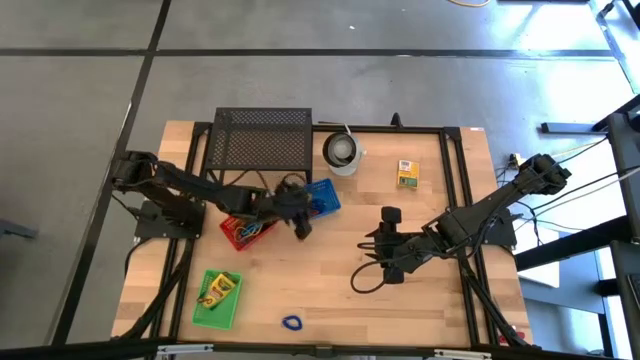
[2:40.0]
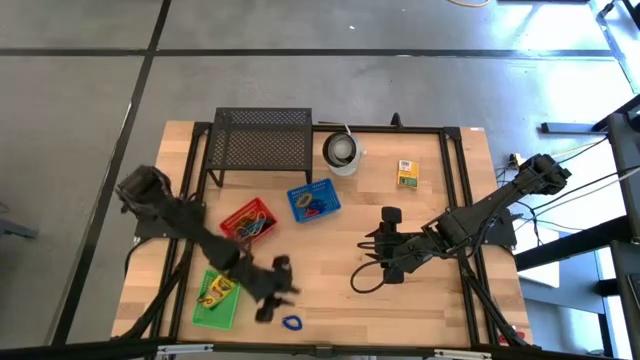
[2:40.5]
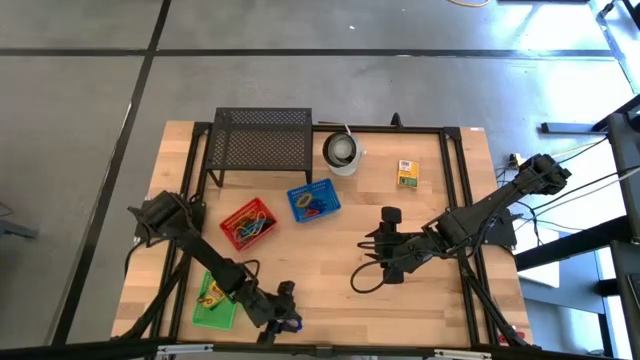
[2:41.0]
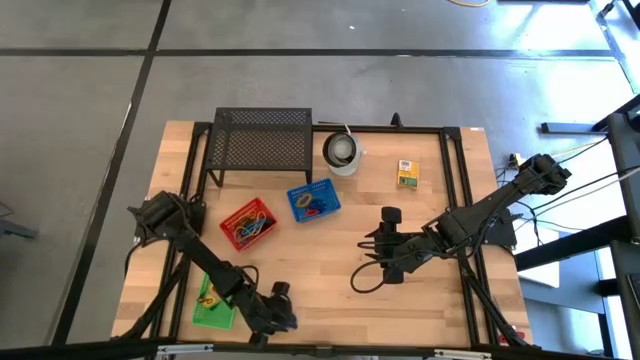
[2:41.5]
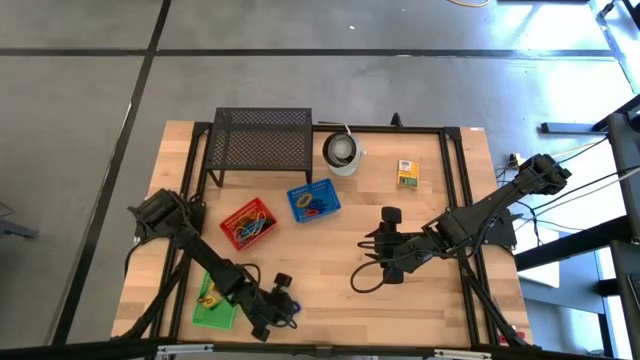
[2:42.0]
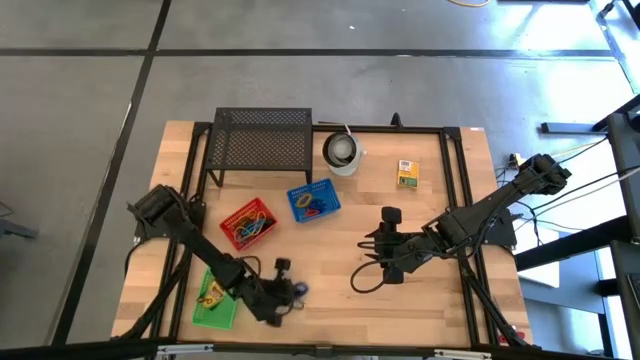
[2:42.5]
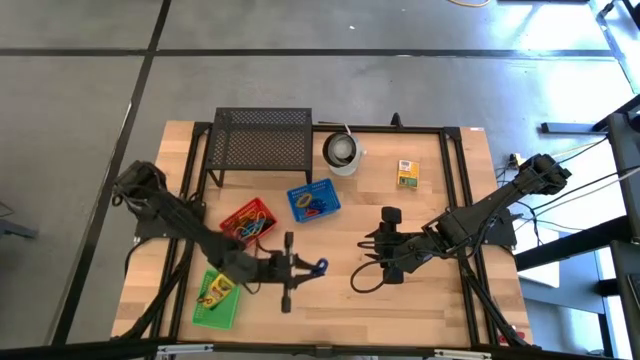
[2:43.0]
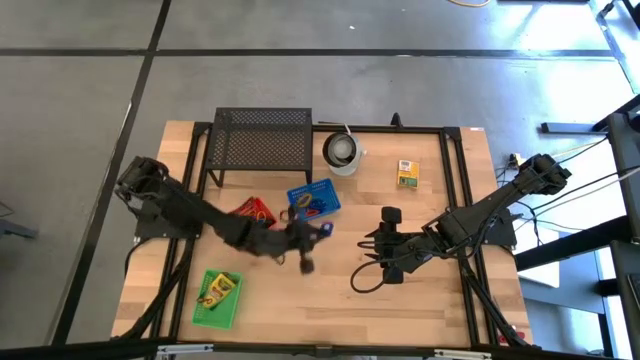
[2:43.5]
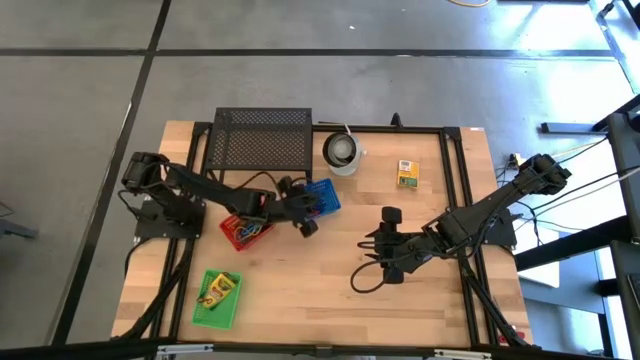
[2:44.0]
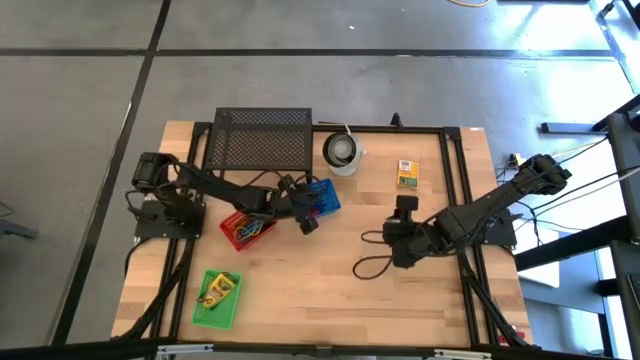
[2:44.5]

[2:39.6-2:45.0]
Task: Pick & Place Office Desk Supplies
Put the blue spring keychain into the blue bin

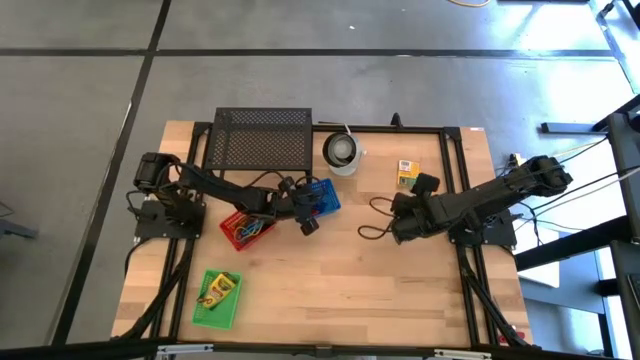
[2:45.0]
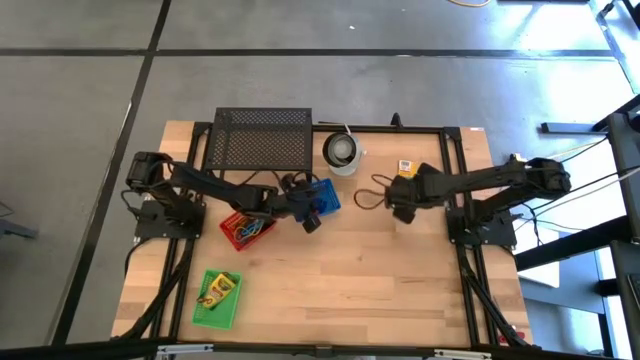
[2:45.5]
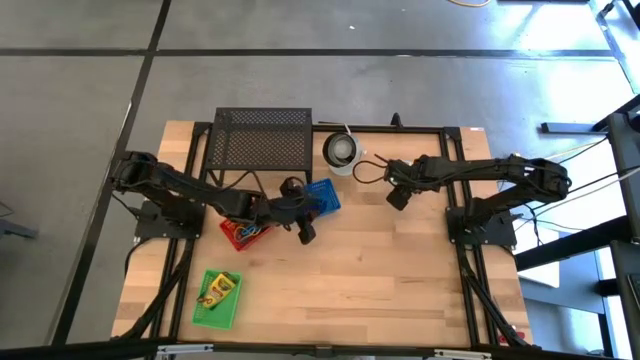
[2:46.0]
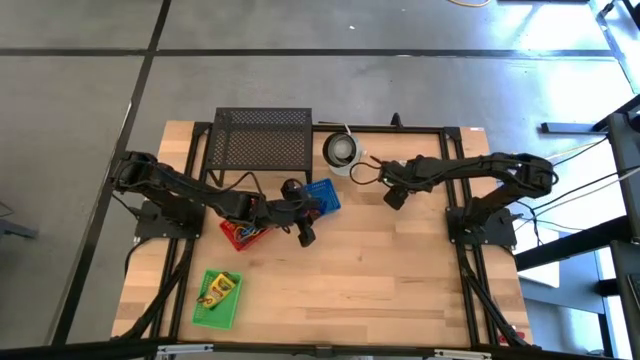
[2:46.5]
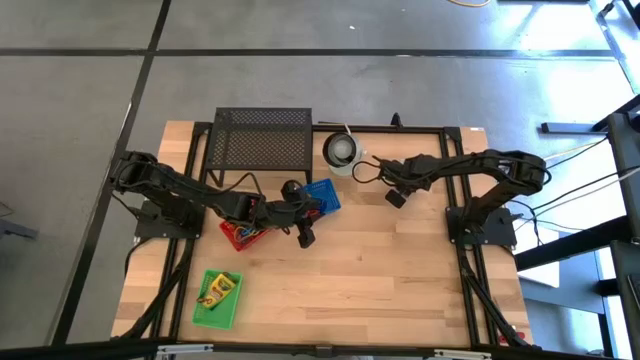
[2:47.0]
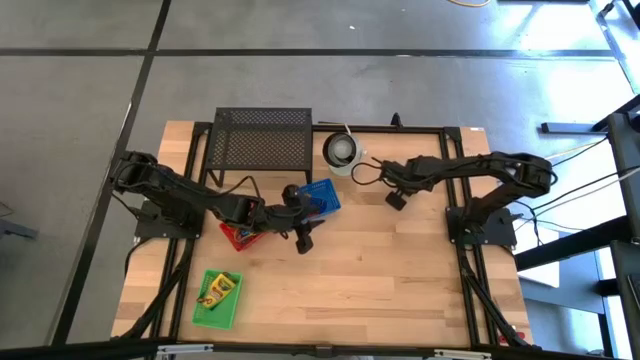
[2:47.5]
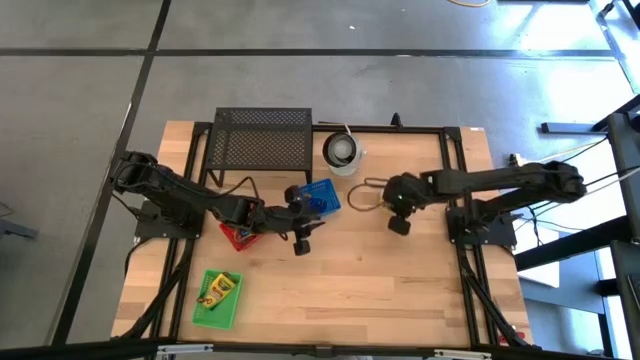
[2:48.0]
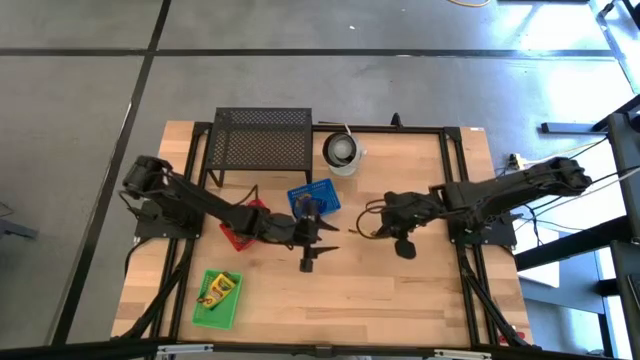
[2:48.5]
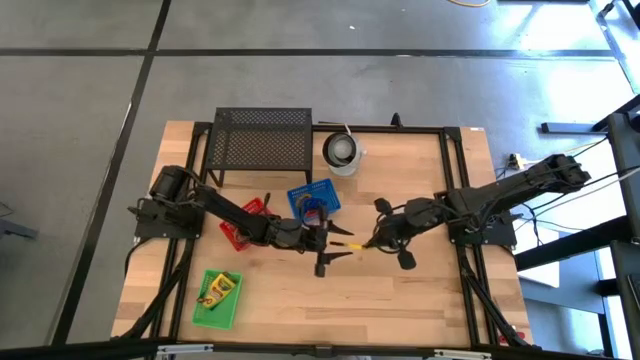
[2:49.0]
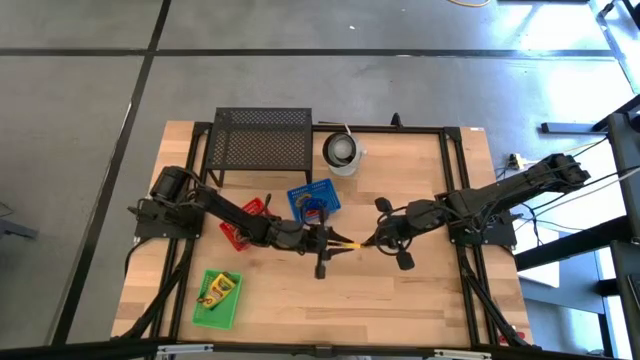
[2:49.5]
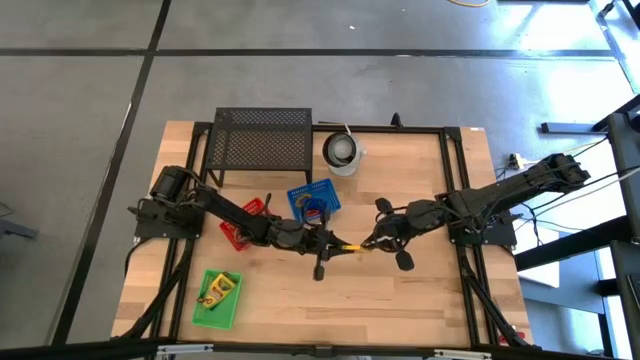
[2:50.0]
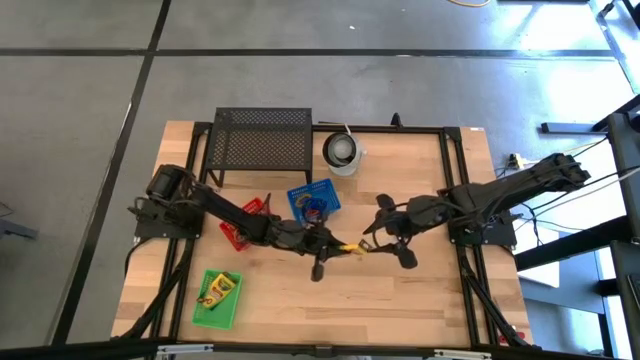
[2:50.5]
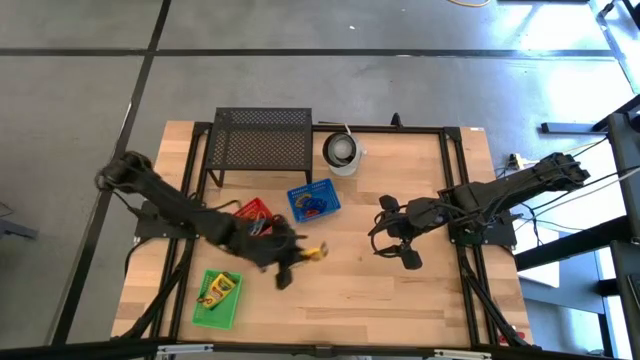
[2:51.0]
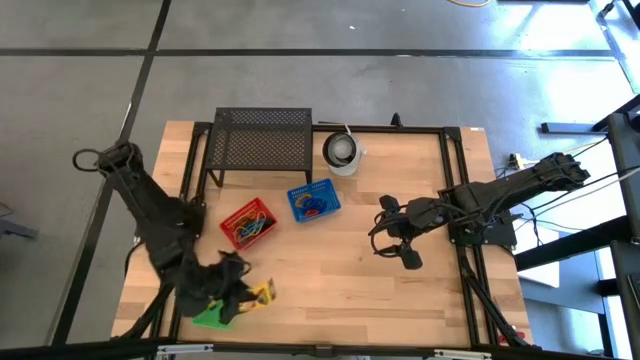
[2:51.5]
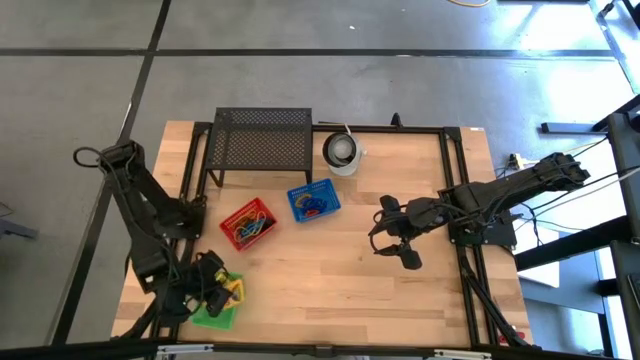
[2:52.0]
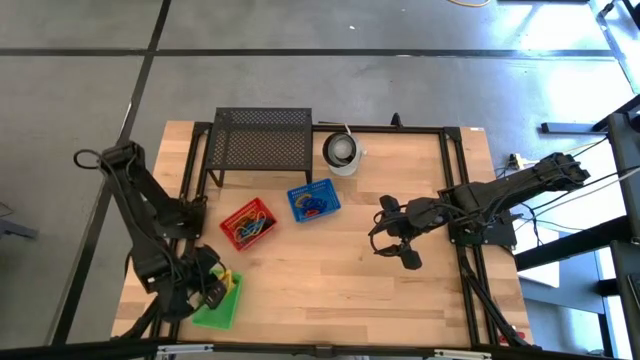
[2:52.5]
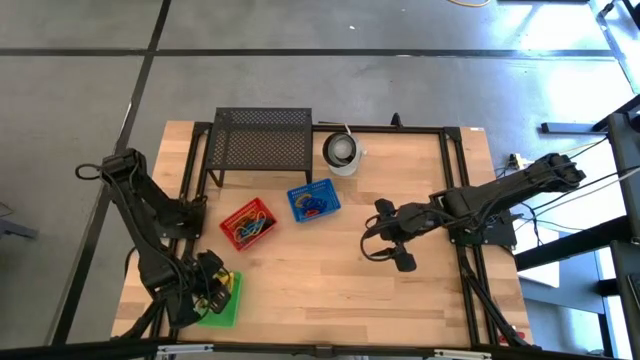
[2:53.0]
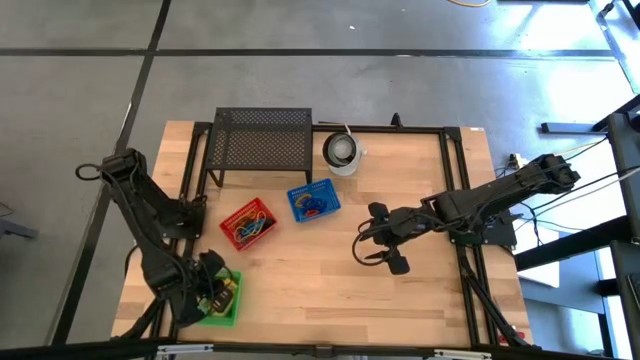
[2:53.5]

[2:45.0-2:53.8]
Put the crayon box into the green bin

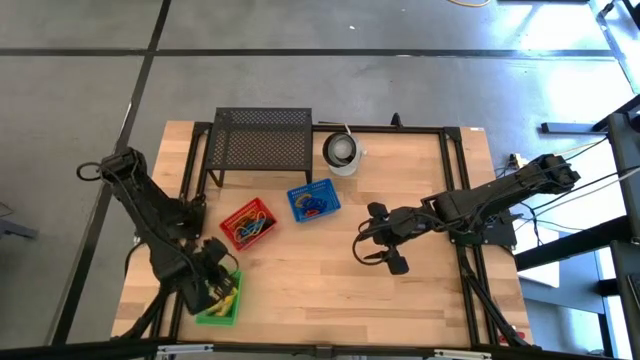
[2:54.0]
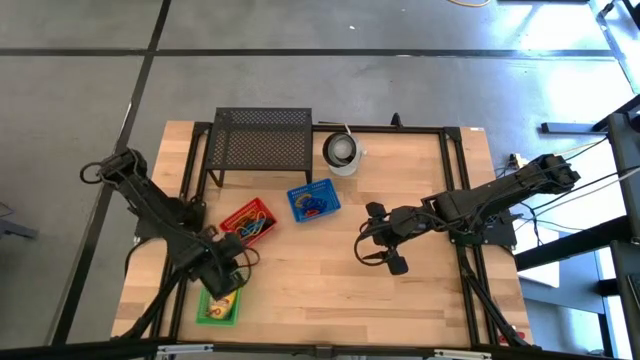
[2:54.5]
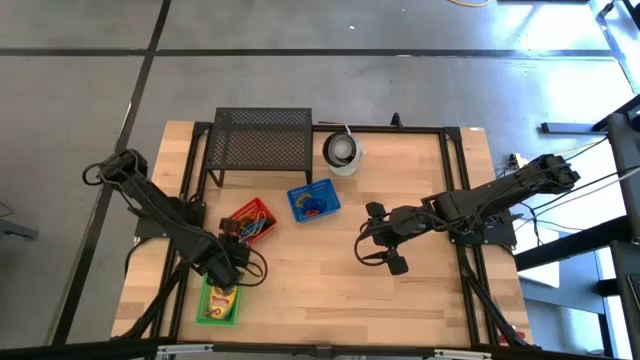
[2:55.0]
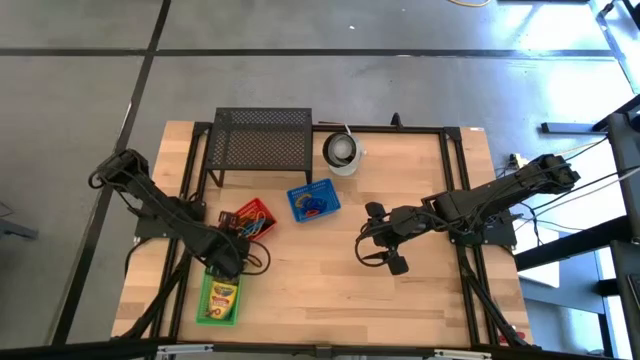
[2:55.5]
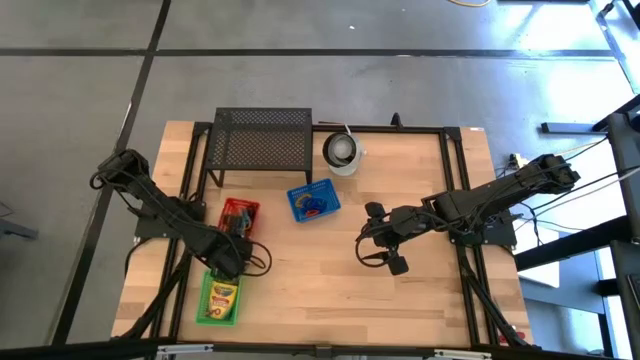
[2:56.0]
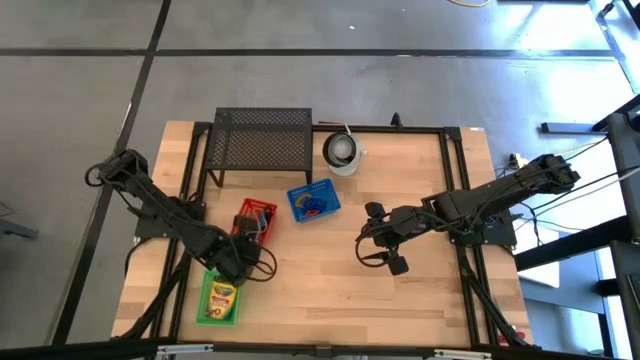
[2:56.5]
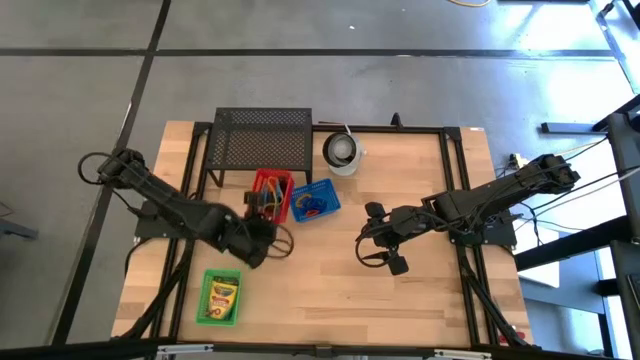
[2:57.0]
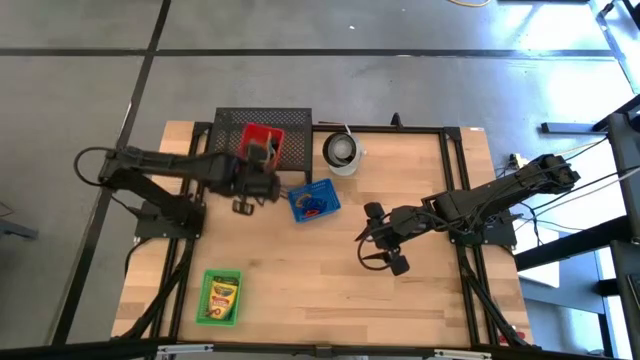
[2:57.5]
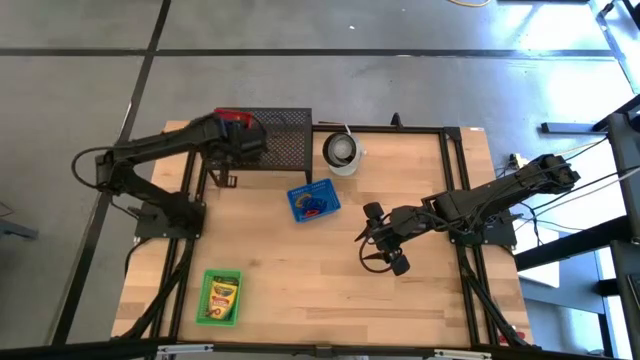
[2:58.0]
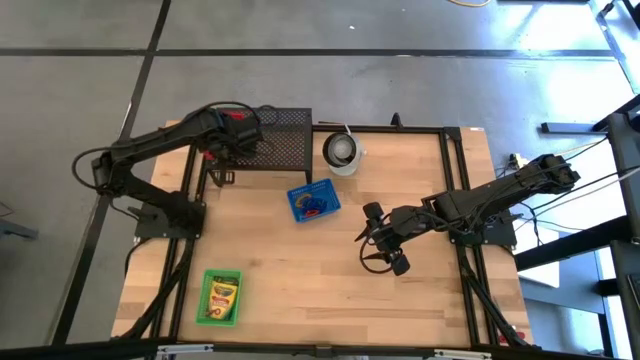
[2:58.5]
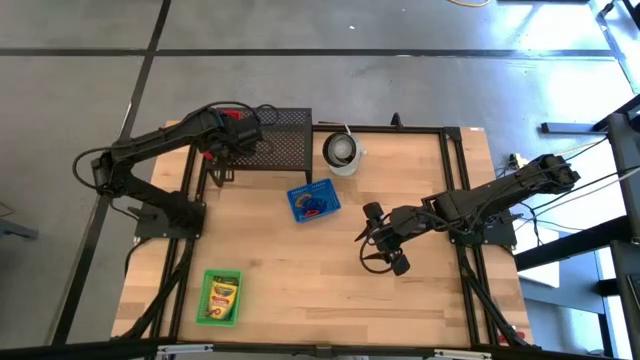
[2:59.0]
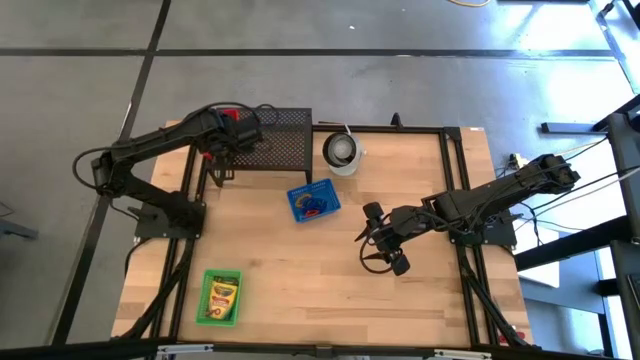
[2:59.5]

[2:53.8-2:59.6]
Put the red bin with rubber bands on the shelf

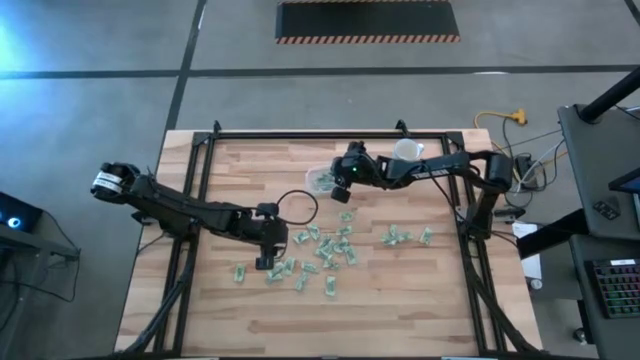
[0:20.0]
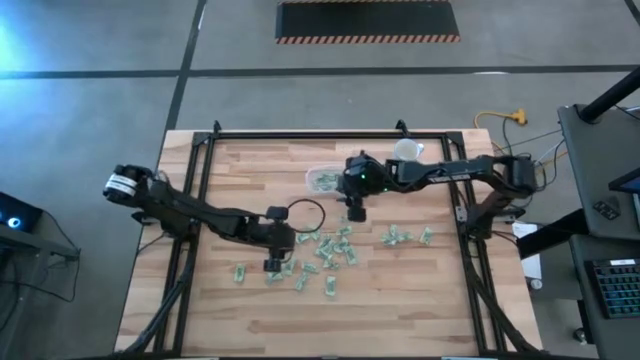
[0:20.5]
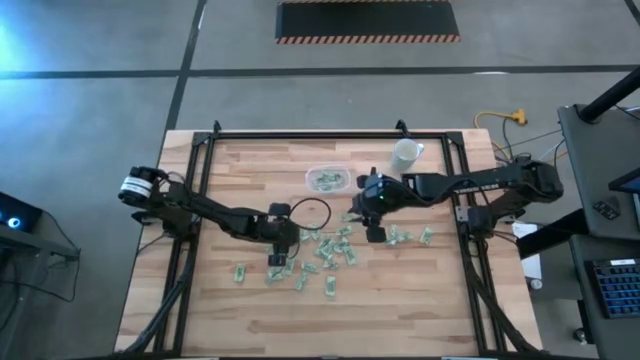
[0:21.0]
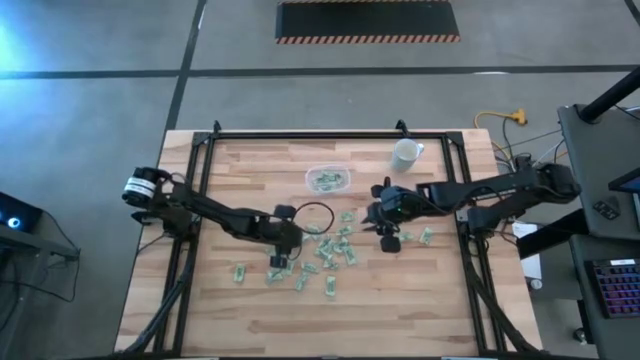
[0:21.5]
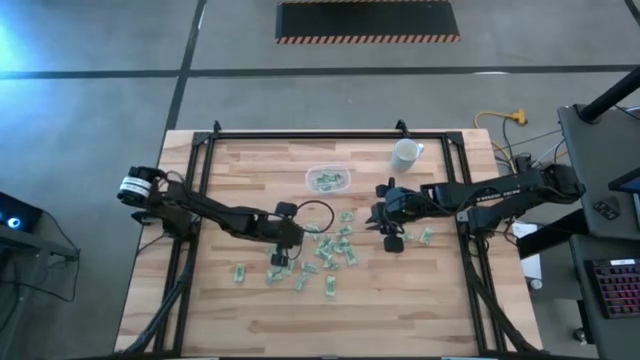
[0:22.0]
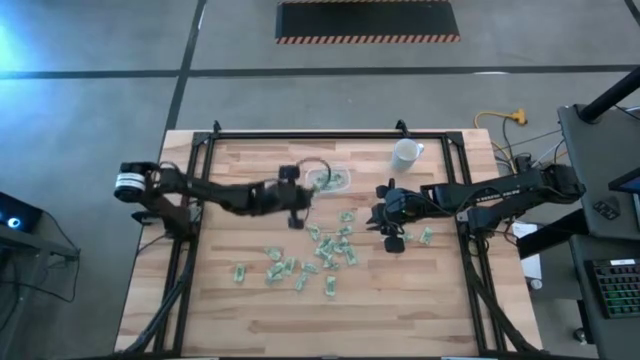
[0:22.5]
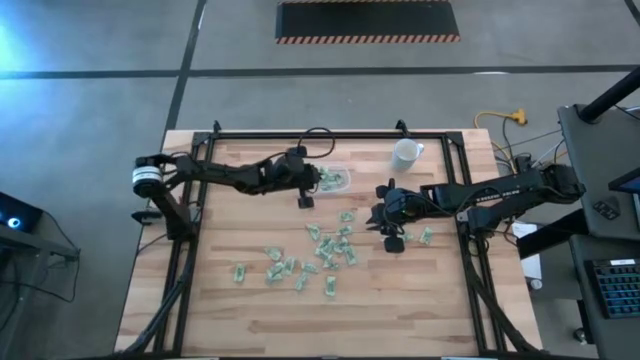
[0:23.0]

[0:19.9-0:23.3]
Task: Pick and place Stevia / Truvia into bins
Put the stevia packet into the transparent container
